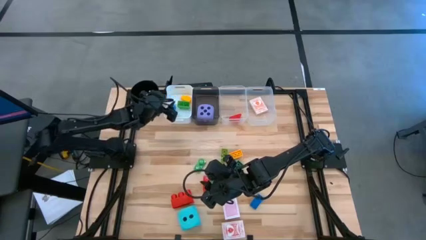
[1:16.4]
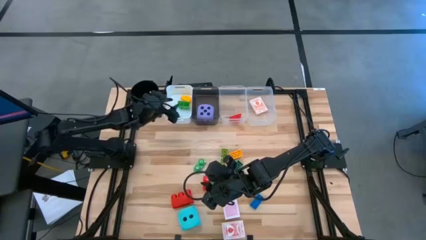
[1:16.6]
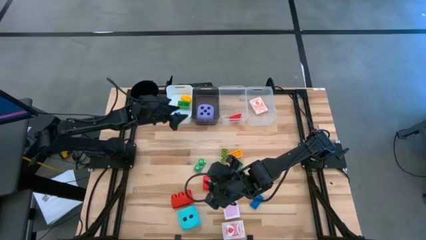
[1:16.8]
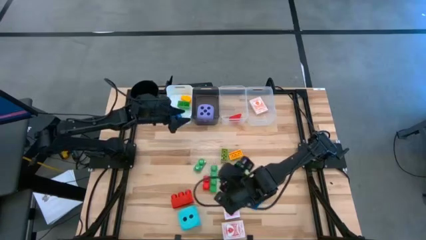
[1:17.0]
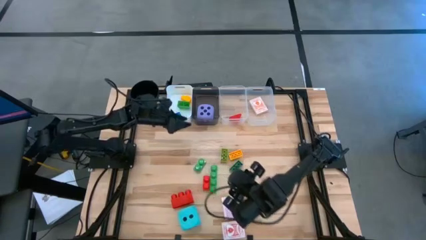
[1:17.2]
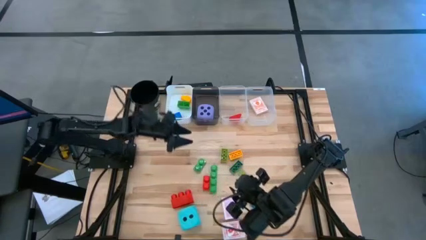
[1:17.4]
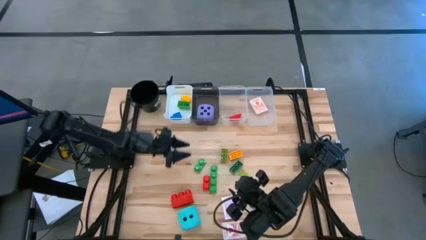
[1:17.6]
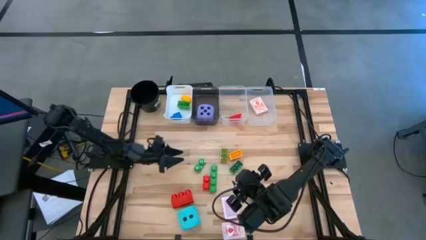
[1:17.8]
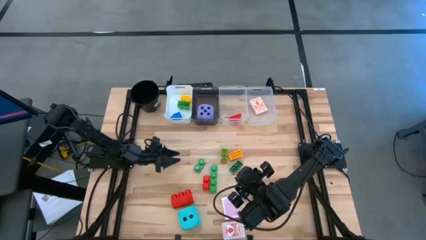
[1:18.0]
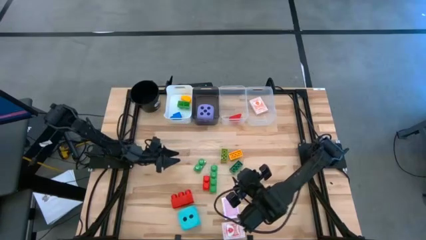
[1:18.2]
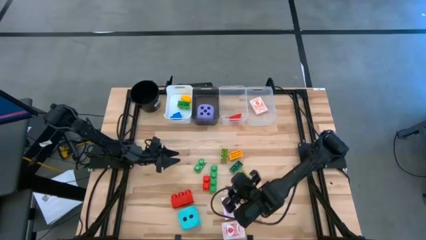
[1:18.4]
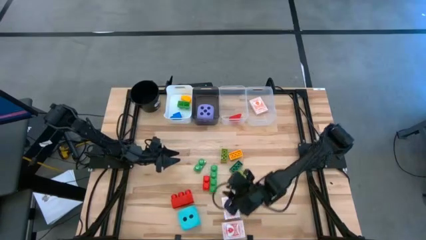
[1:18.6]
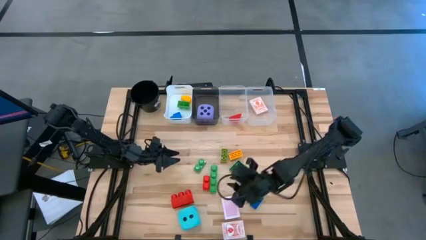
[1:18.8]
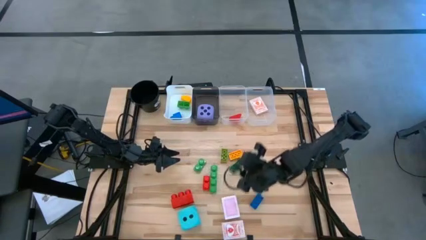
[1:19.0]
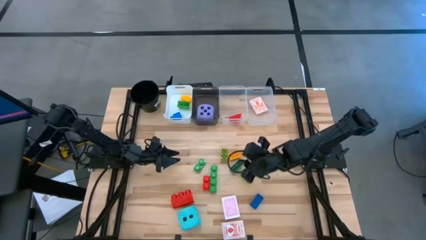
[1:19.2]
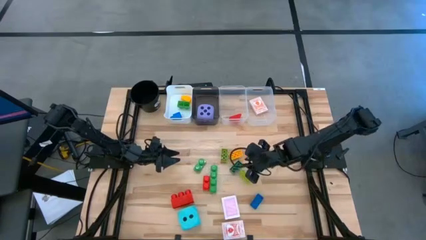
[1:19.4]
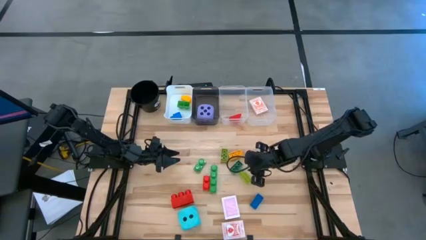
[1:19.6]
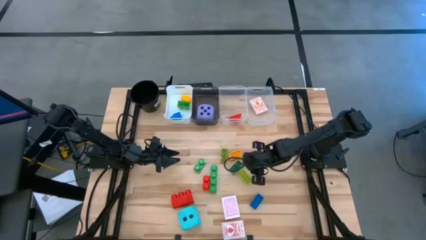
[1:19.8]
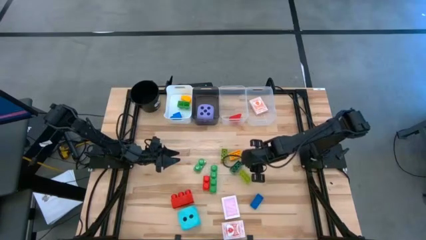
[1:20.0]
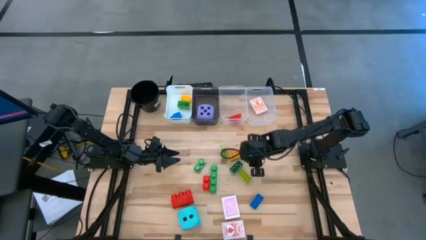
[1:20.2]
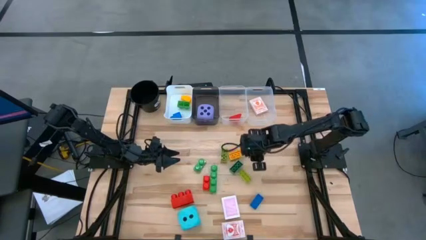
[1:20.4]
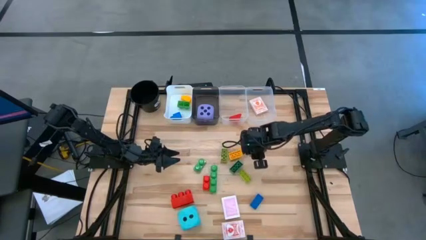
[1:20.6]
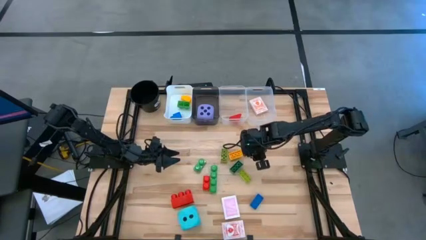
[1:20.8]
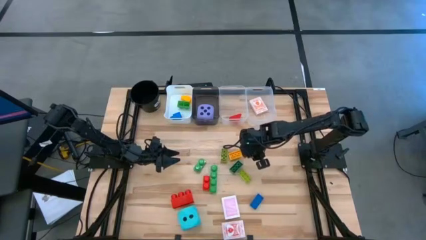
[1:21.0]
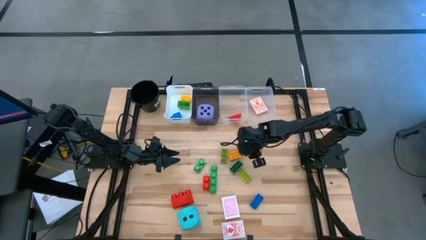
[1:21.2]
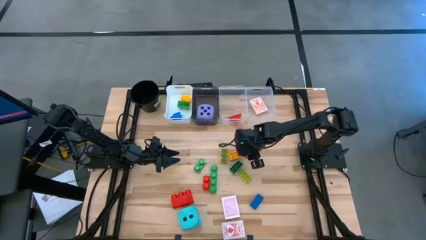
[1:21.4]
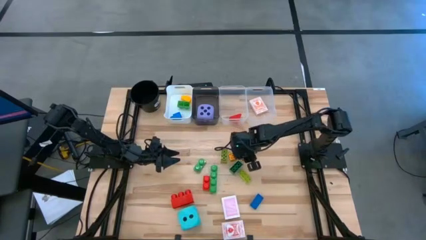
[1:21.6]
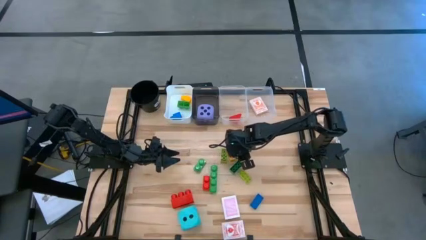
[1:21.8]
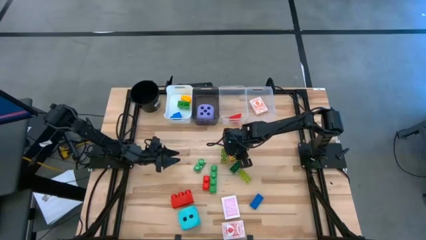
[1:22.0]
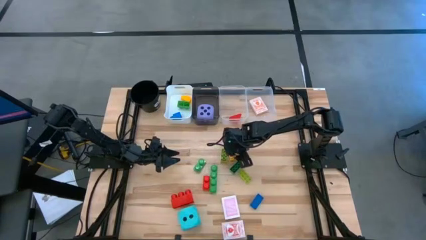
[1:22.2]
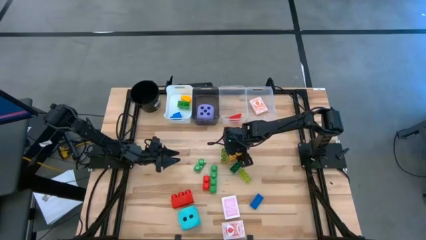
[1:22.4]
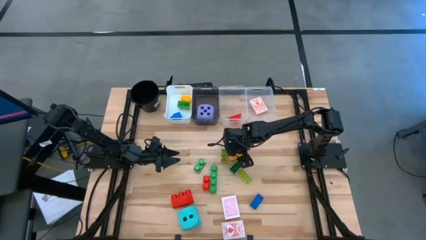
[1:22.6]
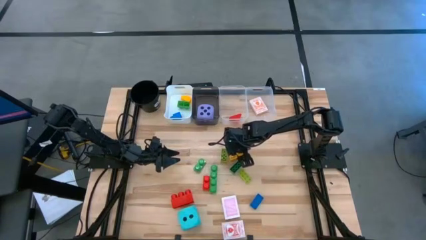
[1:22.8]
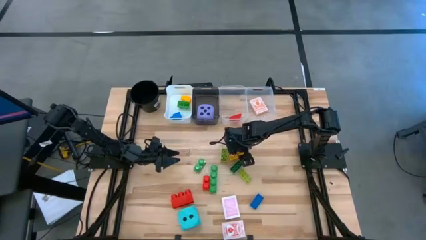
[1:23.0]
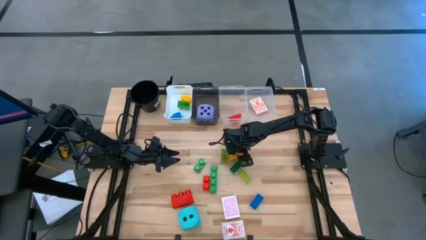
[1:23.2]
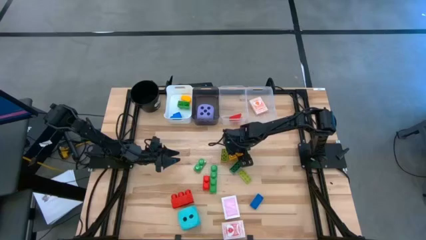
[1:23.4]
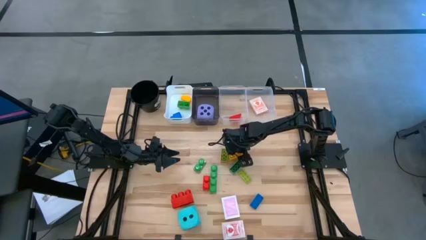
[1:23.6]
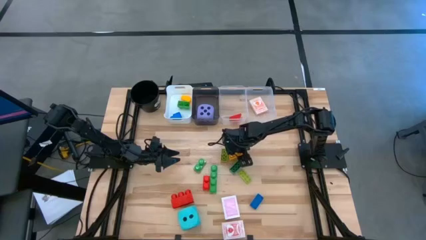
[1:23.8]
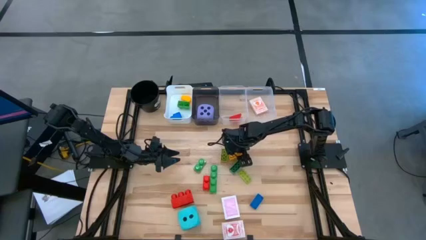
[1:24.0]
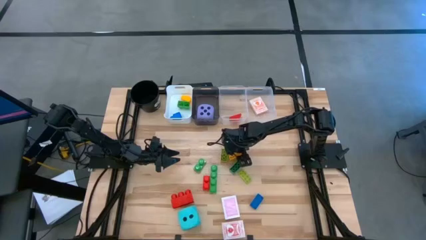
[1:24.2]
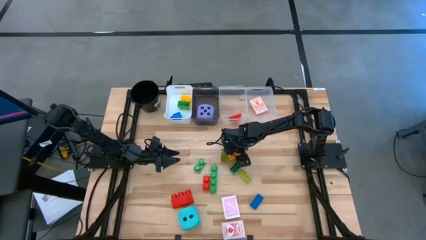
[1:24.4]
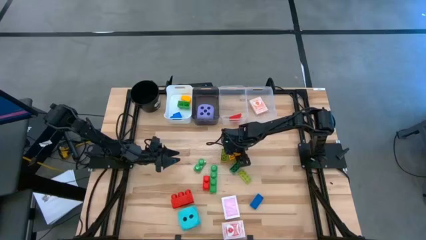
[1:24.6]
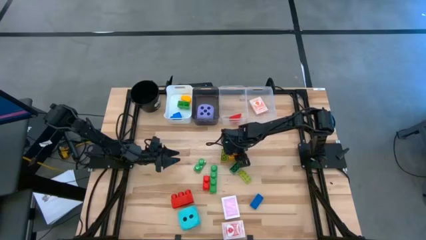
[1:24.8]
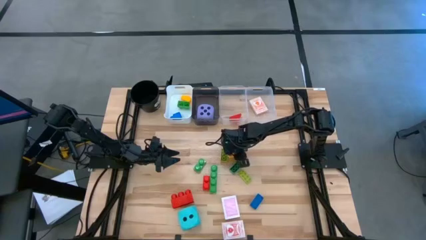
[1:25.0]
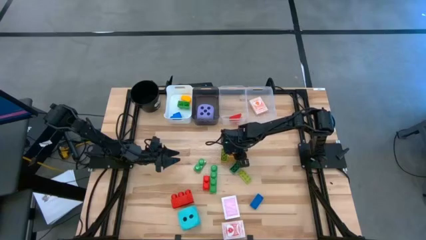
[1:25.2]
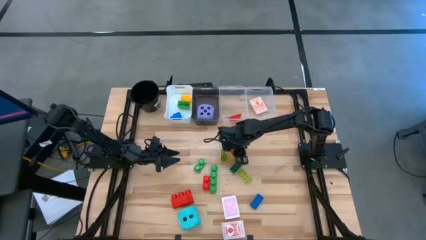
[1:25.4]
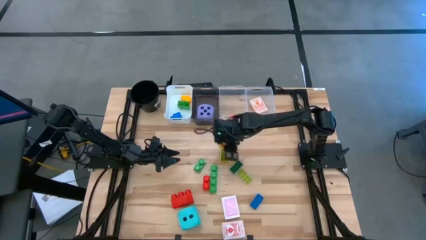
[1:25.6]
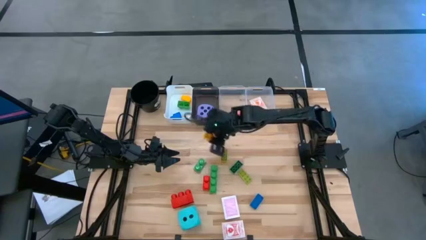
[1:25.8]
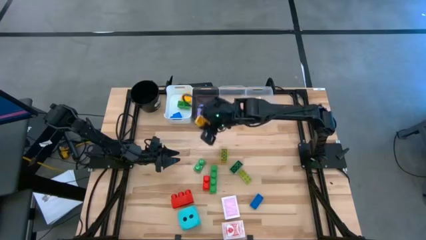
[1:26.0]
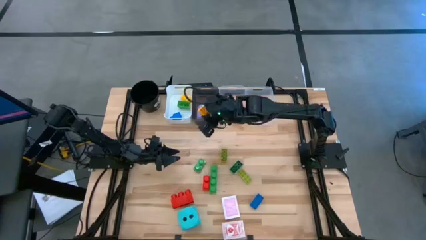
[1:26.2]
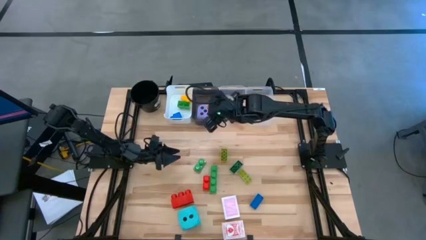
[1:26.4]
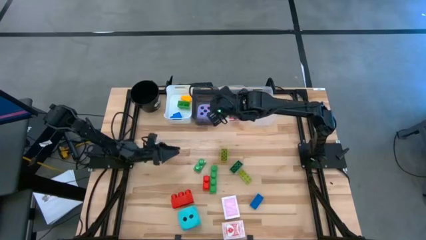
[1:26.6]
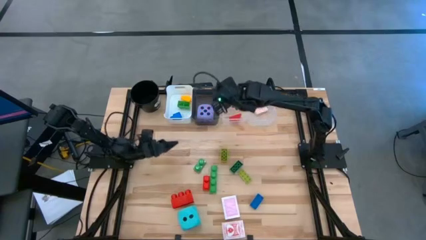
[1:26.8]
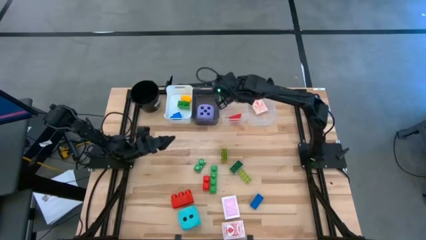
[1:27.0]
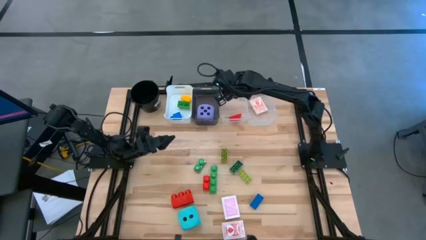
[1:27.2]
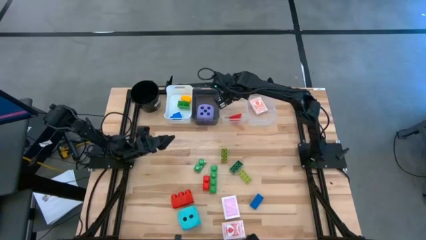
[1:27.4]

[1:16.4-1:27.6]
Task: Pick & Place Toys
Put the small yellow 8-stud game piece into the left transparent bin
